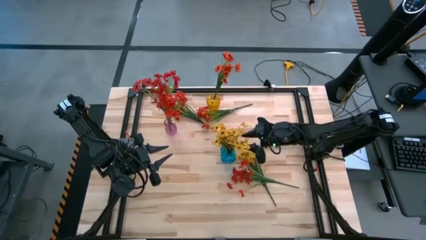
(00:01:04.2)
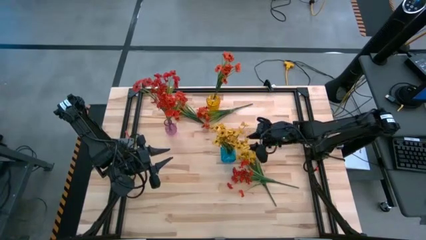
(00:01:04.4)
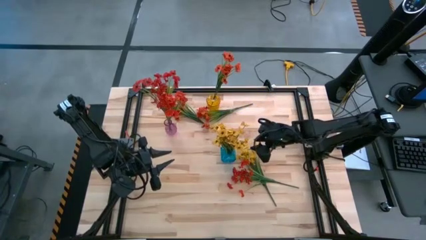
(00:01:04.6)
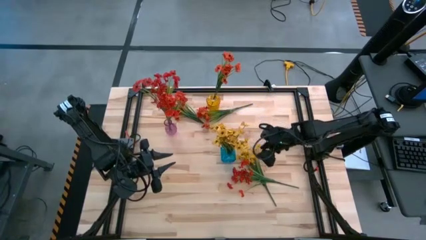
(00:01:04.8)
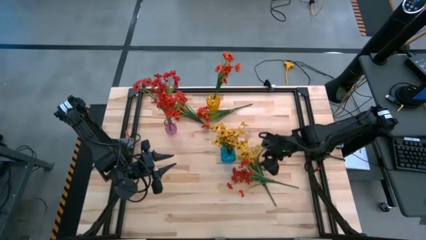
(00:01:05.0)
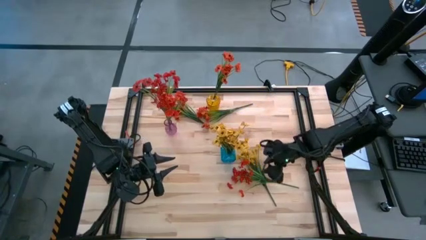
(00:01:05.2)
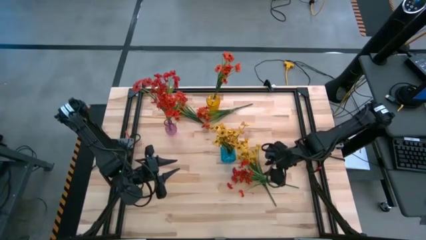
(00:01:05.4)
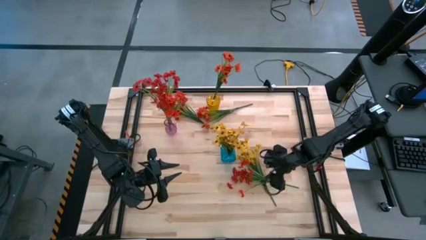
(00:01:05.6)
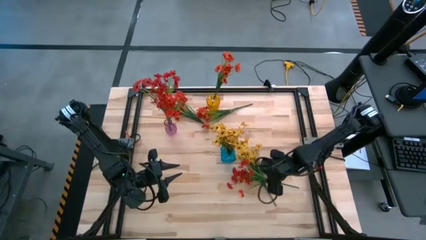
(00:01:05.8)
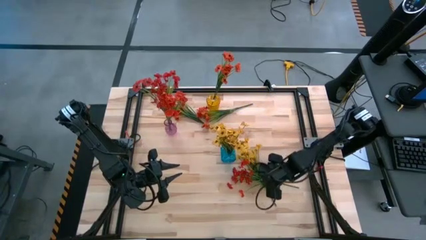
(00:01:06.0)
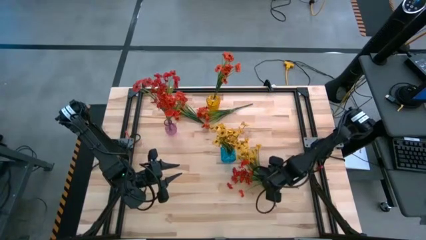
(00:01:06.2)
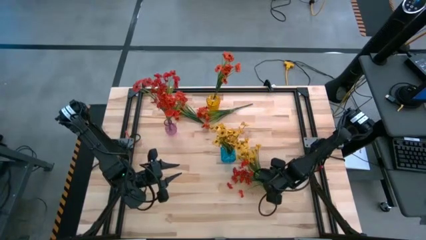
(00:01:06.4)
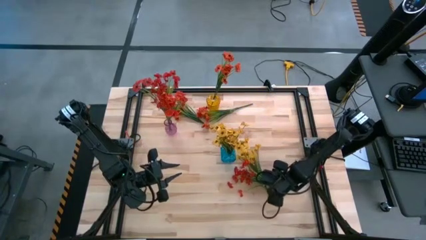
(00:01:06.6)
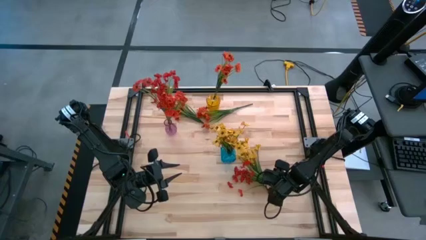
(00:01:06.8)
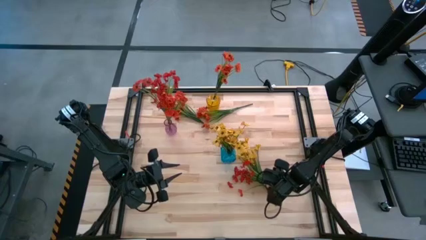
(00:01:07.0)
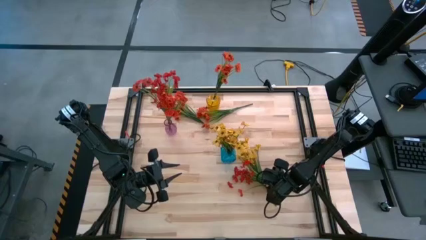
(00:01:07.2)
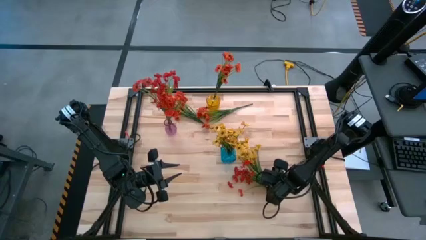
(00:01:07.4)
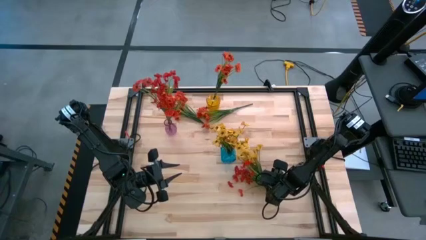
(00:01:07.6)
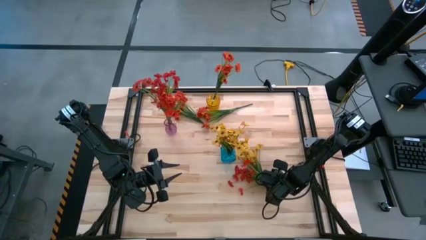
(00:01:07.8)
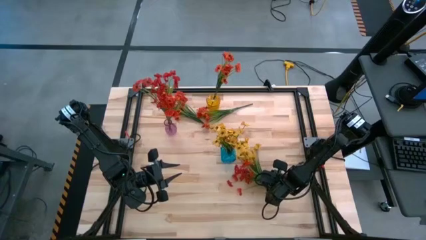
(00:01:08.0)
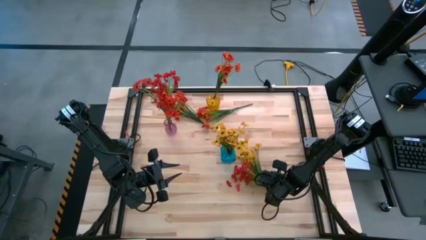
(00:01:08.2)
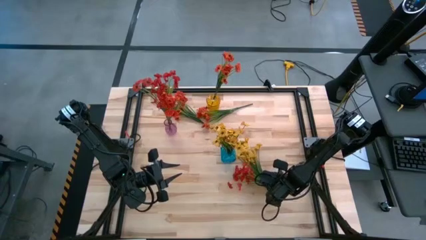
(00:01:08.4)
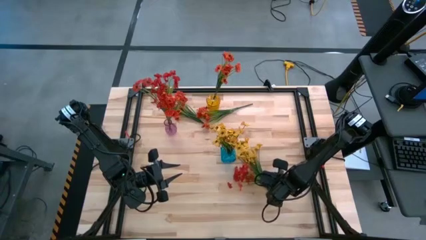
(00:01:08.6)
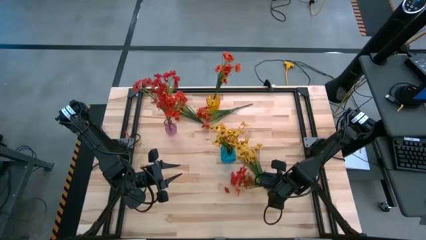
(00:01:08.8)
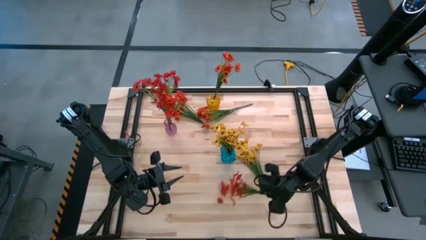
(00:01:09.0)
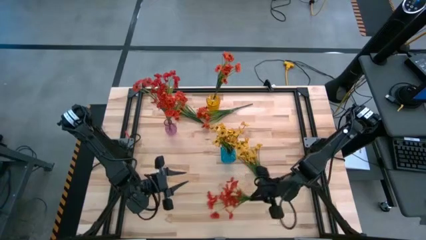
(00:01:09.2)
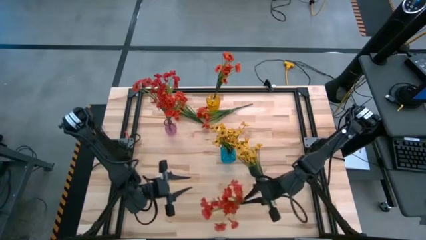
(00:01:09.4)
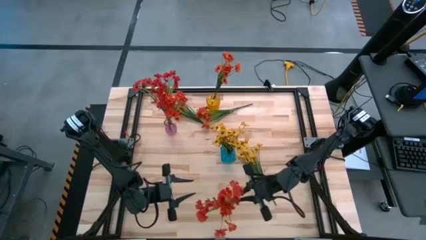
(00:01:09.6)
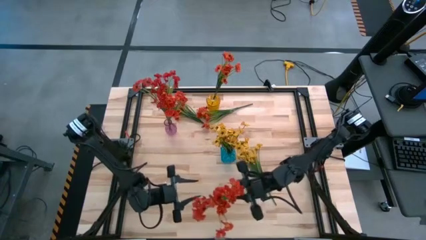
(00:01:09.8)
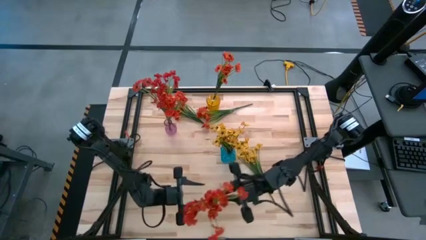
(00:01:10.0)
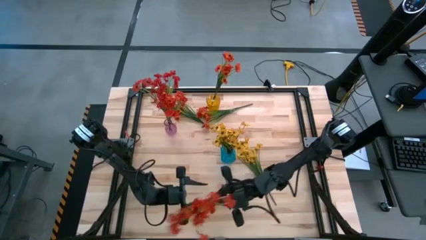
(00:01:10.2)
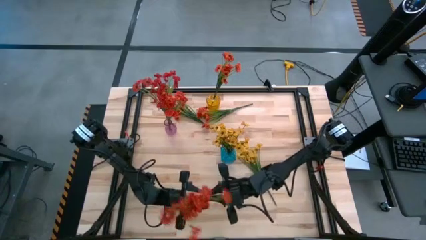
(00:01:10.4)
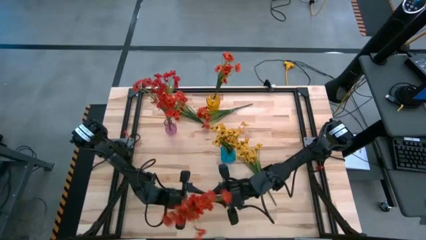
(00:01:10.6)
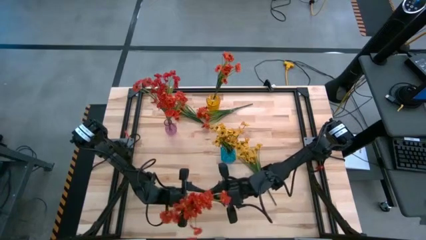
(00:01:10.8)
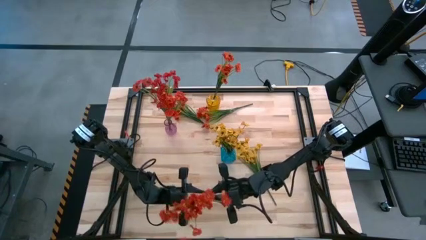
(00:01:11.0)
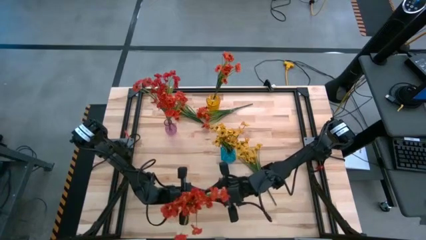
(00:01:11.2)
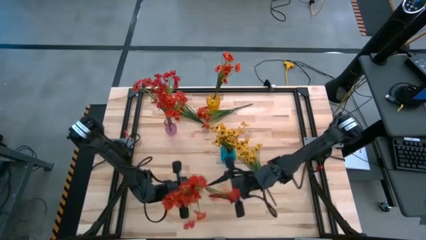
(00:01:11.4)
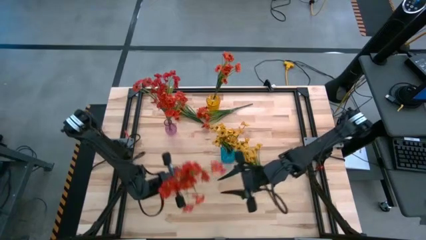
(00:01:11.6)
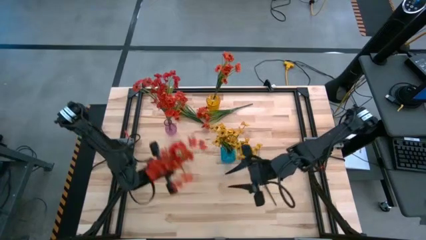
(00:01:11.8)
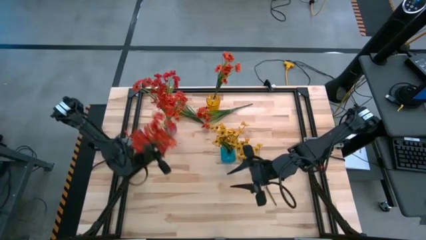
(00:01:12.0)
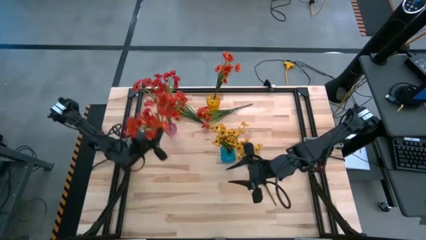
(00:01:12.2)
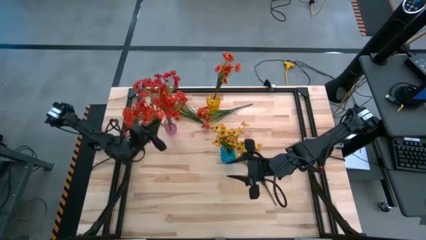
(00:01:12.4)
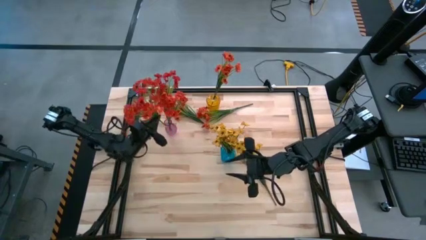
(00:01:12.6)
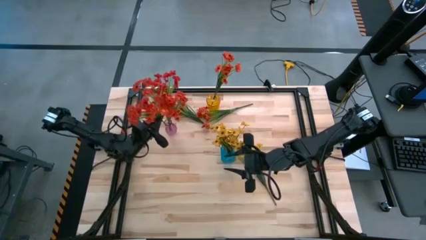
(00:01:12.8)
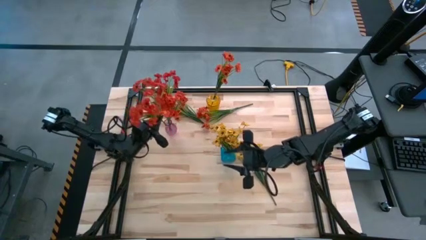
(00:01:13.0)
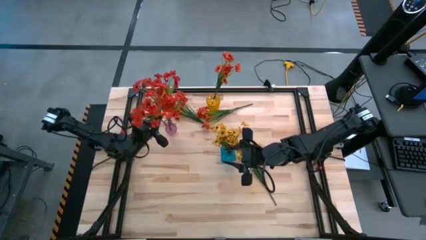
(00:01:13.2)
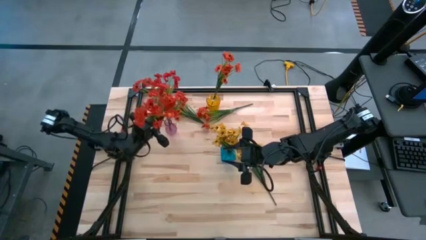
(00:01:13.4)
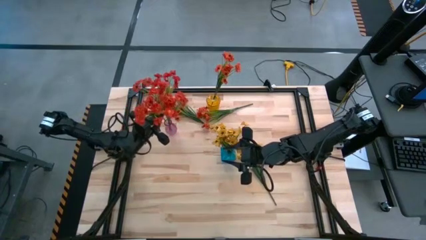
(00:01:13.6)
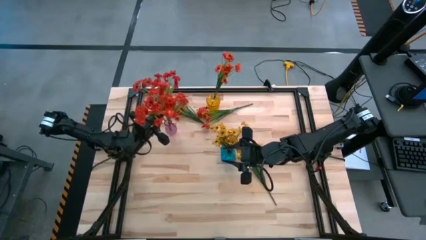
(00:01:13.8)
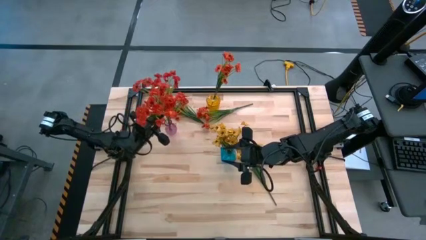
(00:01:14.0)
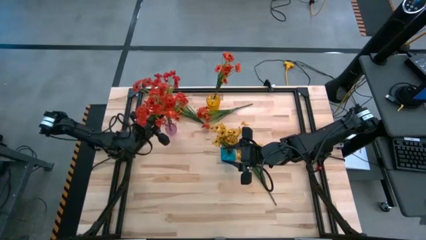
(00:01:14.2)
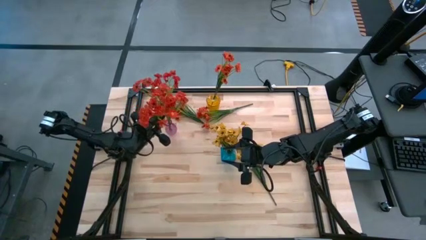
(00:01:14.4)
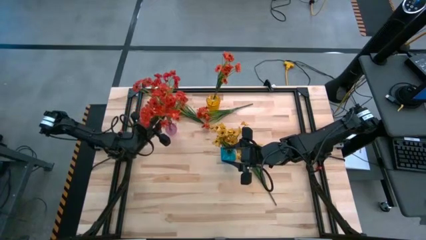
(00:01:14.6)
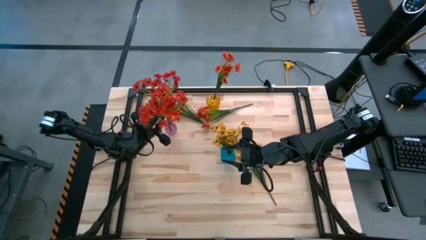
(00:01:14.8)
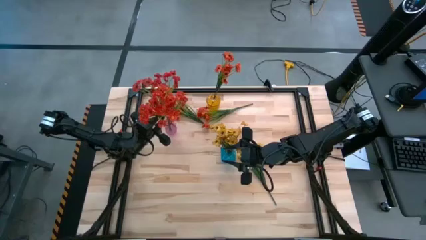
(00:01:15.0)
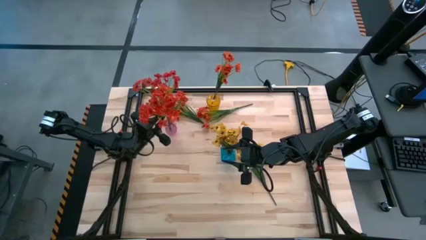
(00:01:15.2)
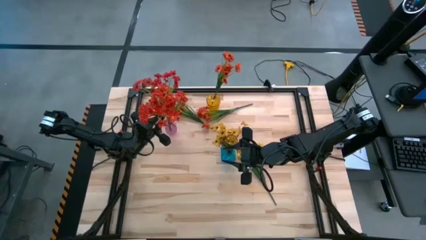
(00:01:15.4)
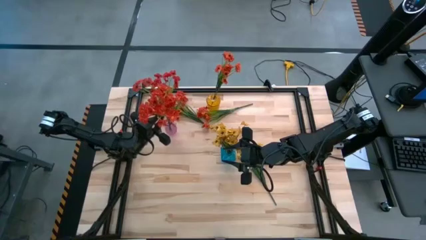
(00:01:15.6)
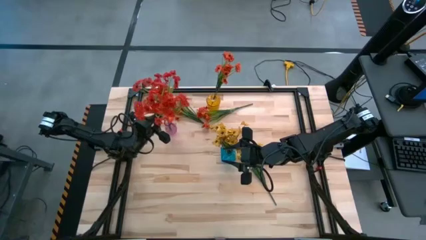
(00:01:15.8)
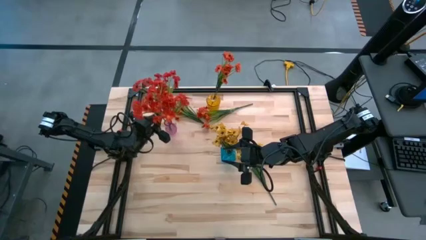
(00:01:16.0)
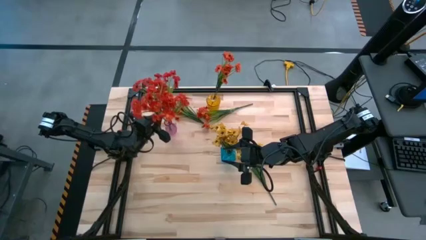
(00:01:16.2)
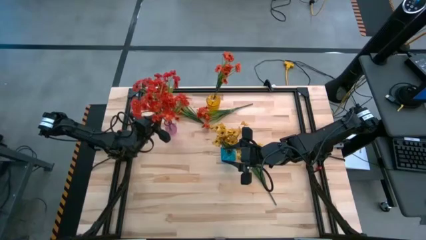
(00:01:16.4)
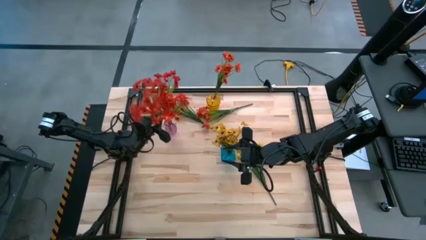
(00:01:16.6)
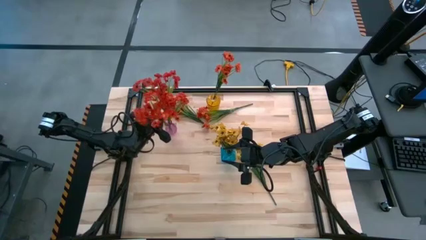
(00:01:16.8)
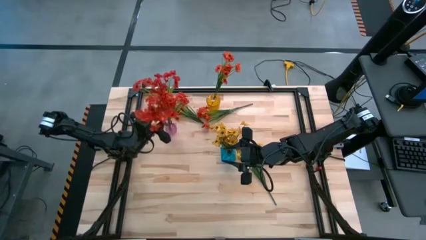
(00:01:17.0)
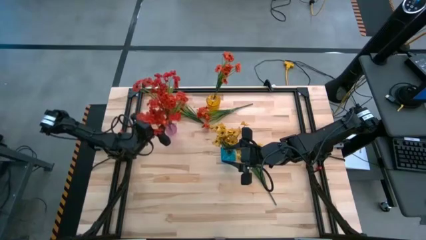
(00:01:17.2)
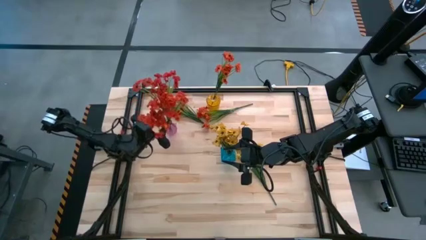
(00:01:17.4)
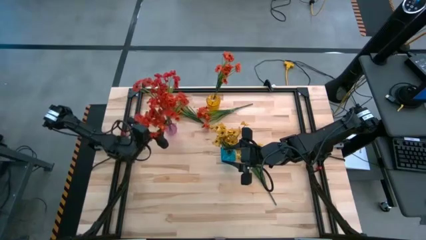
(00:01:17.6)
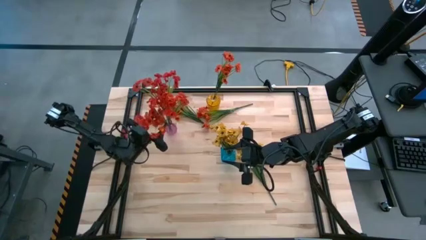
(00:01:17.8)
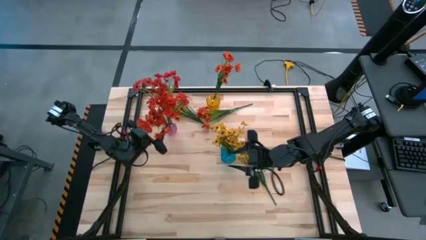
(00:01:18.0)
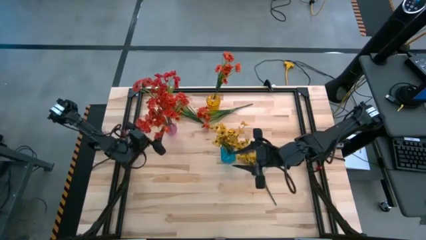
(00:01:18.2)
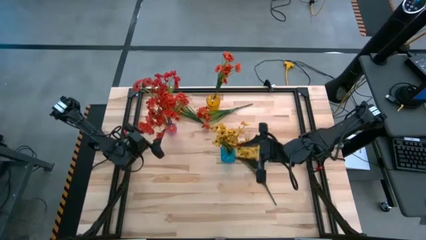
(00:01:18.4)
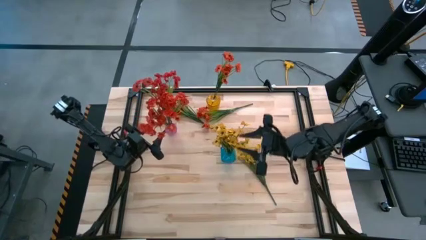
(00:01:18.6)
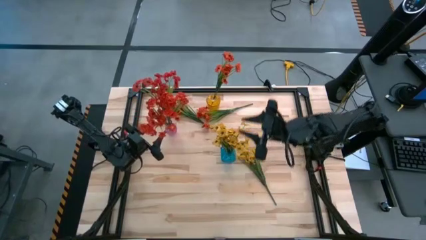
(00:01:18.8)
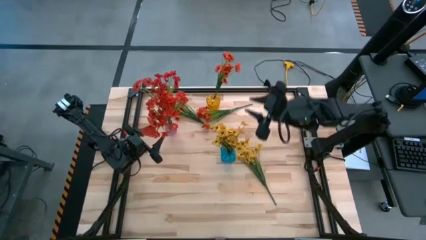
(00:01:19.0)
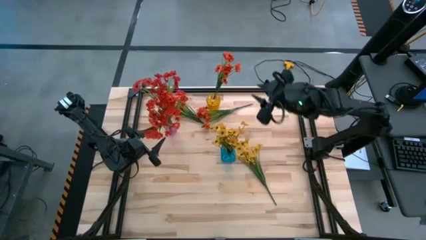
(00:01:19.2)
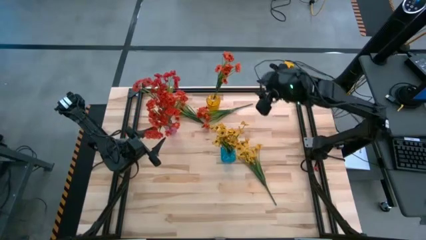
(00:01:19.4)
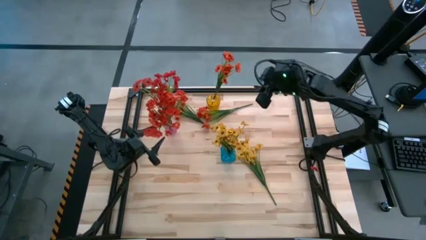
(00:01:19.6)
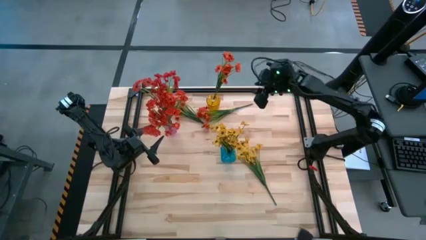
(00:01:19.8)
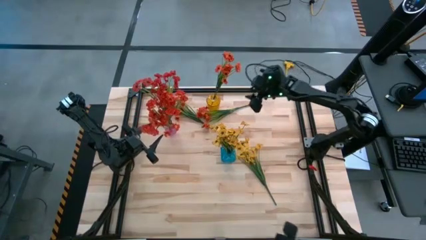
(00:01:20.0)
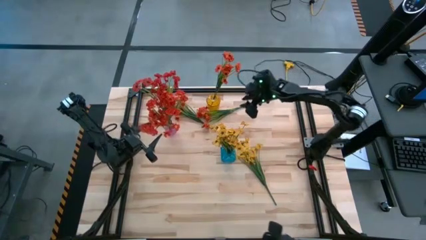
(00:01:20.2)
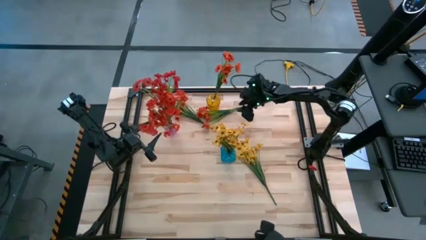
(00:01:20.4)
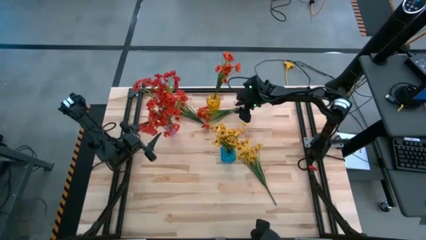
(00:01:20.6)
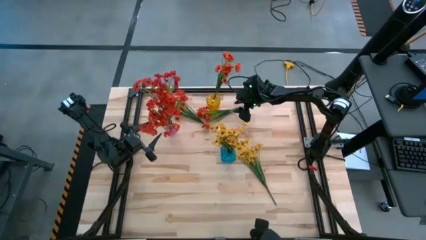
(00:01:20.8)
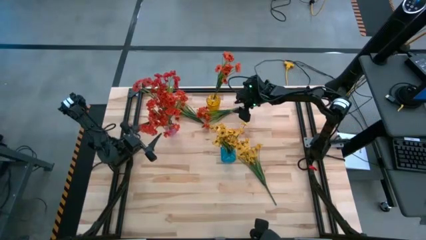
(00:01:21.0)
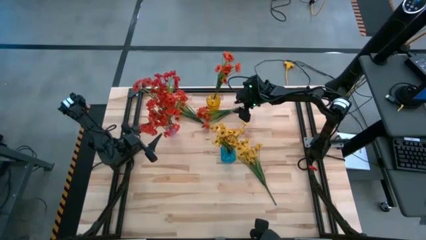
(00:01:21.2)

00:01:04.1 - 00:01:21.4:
Task: Sort flowers into vase by color
Put the red flowers into the purple vase
